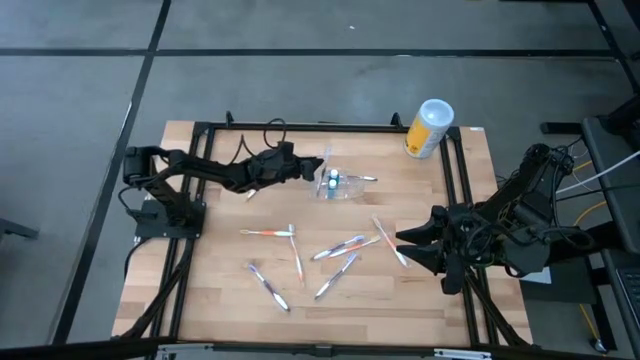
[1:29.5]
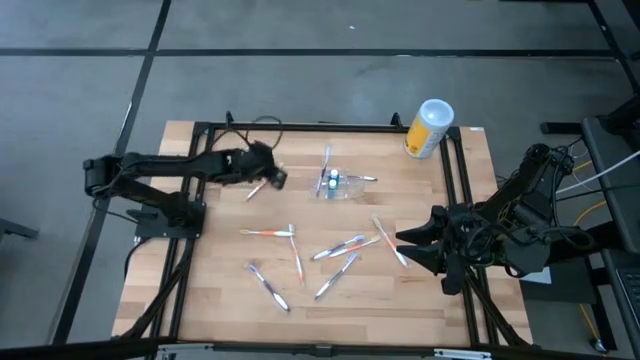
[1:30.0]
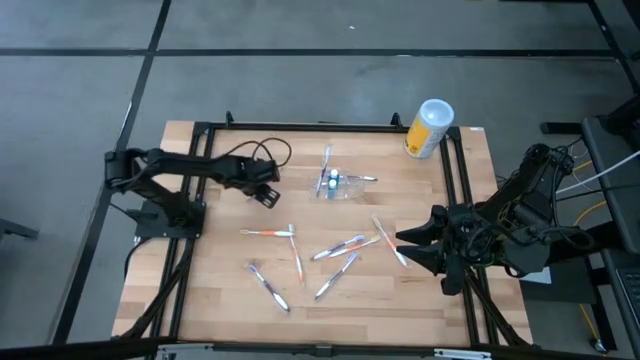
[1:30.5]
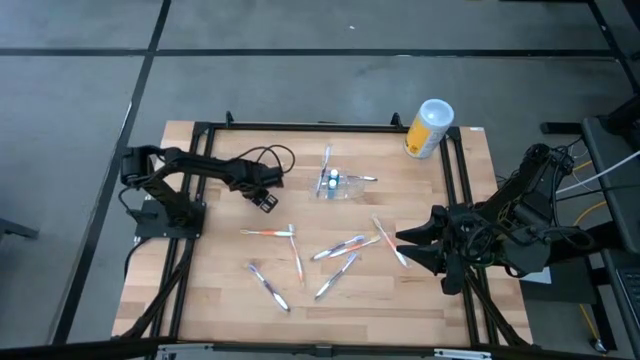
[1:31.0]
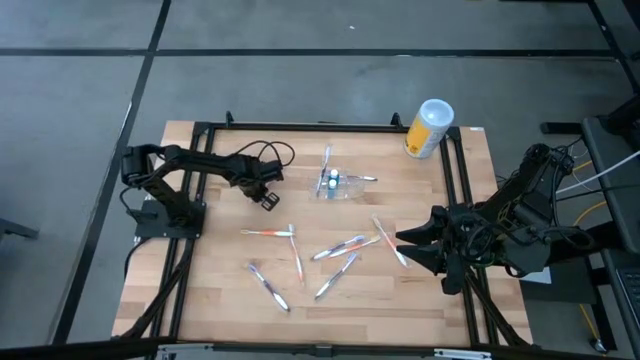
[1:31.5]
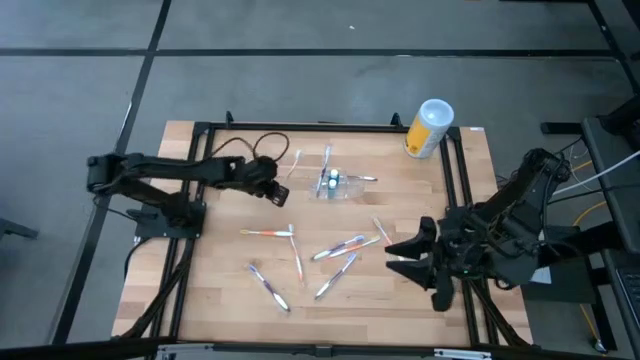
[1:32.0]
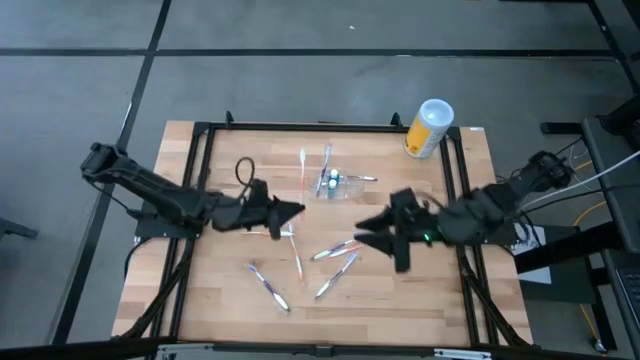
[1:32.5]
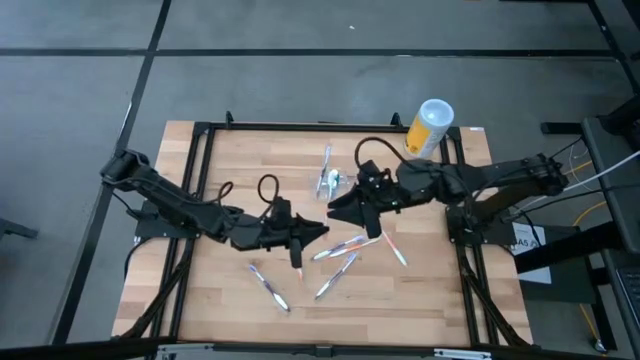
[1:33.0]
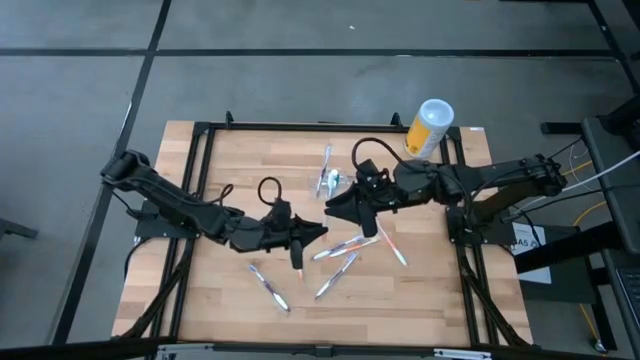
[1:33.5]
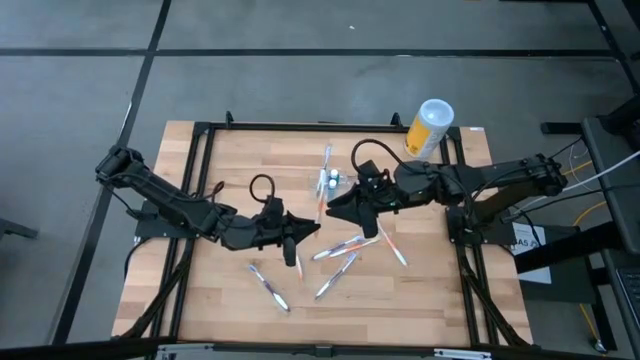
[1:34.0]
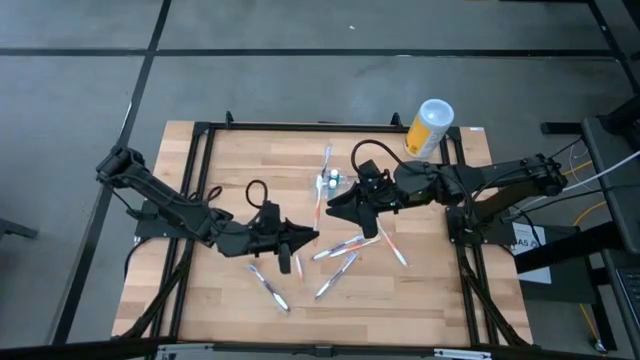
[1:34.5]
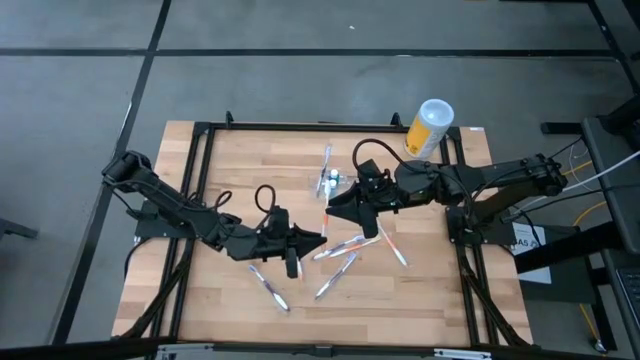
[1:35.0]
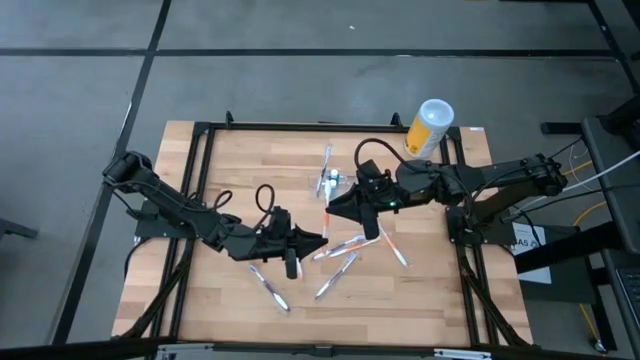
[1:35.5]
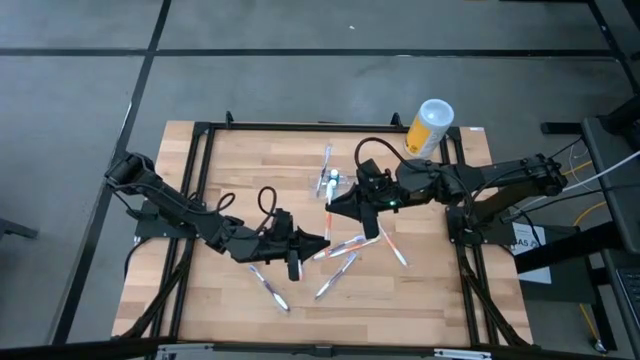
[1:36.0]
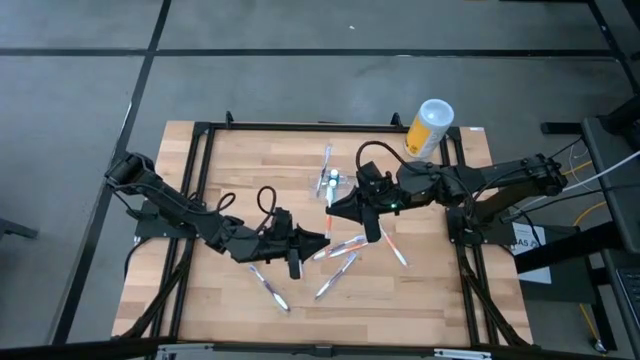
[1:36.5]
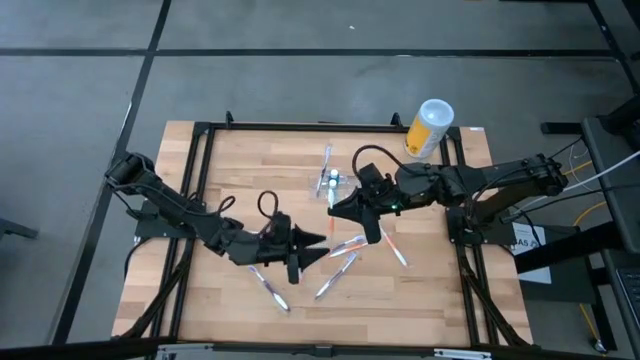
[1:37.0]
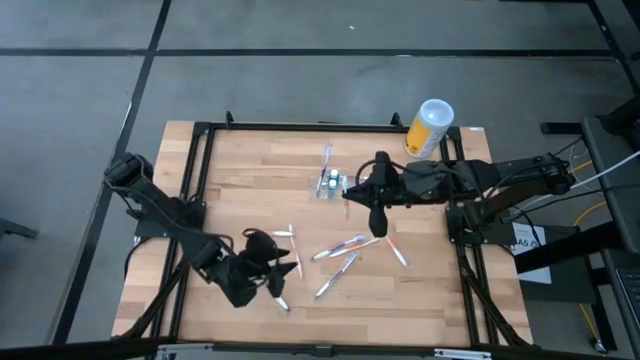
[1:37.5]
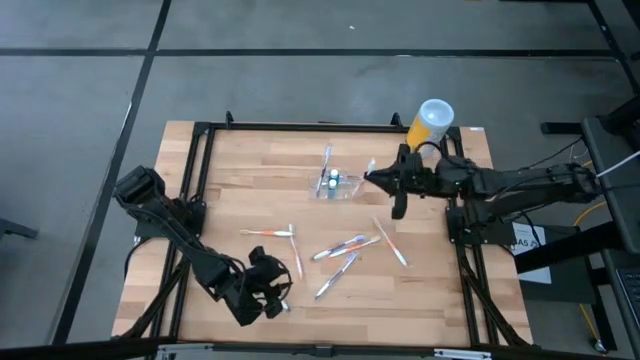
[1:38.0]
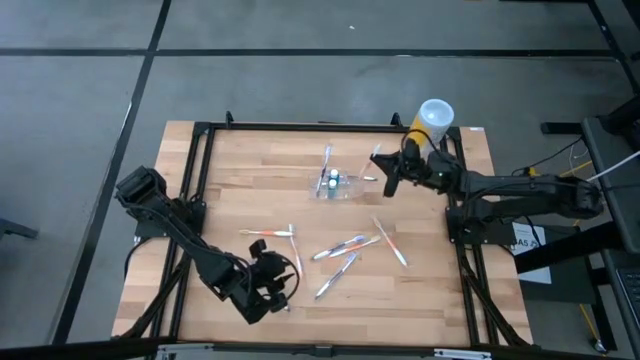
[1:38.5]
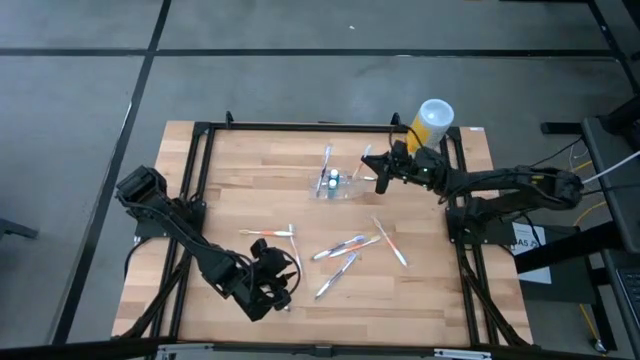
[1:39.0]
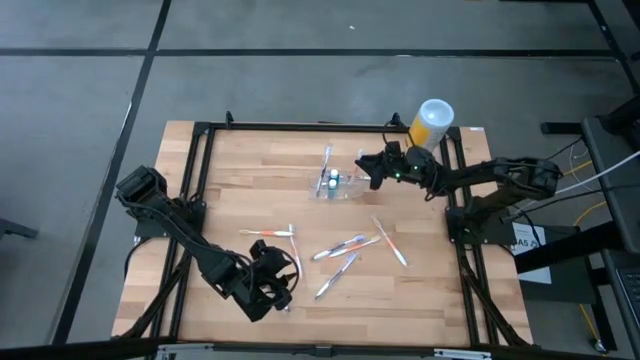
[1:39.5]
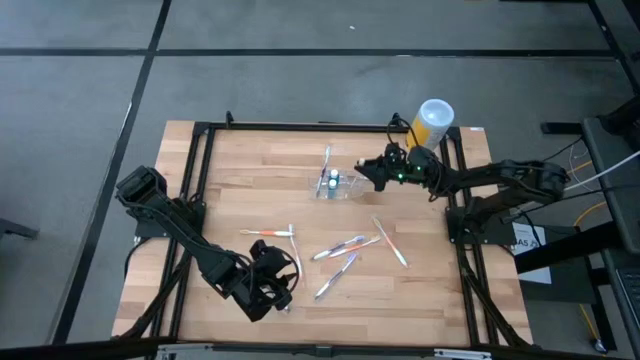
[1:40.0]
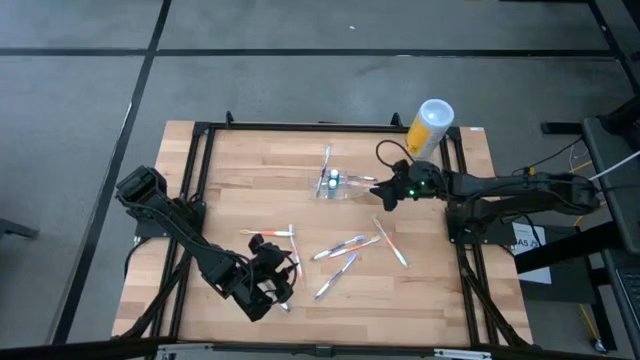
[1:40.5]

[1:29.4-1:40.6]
Task: Pick & Place toothbrushing station
Put the orange toothbrush into the right section of the transparent organizer

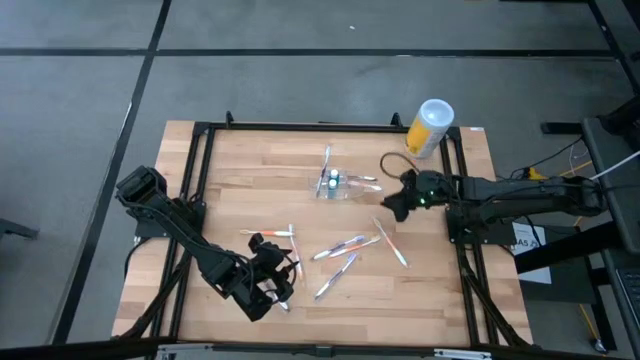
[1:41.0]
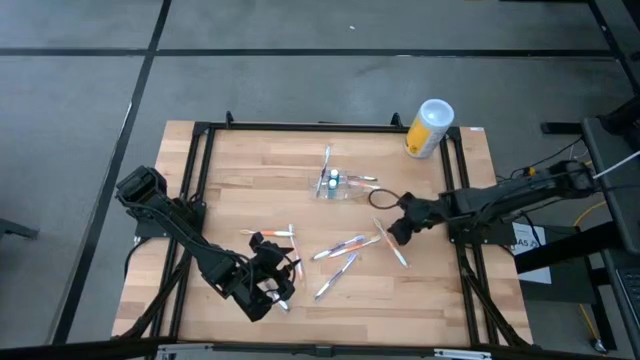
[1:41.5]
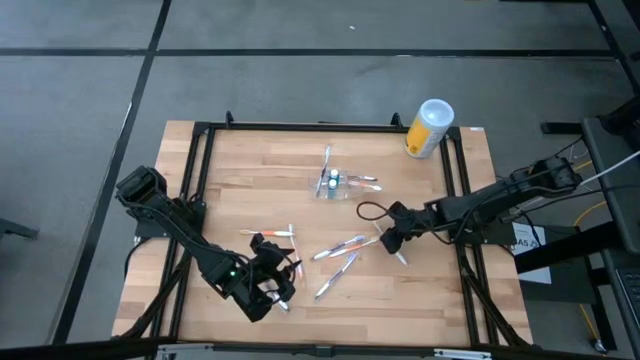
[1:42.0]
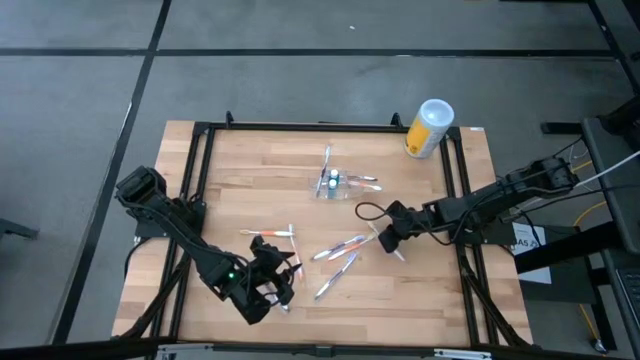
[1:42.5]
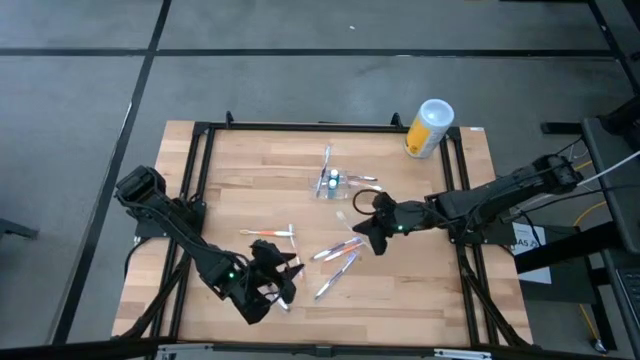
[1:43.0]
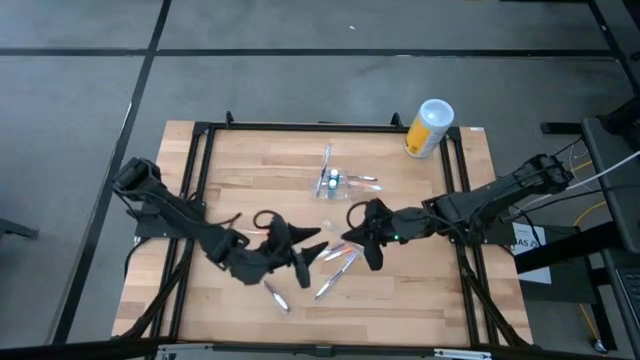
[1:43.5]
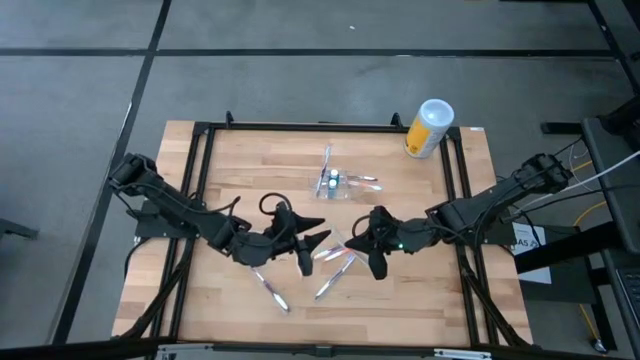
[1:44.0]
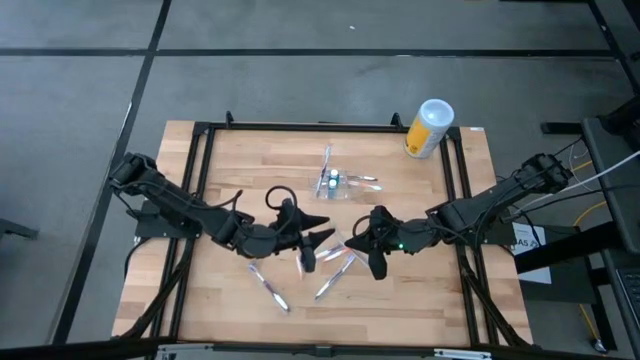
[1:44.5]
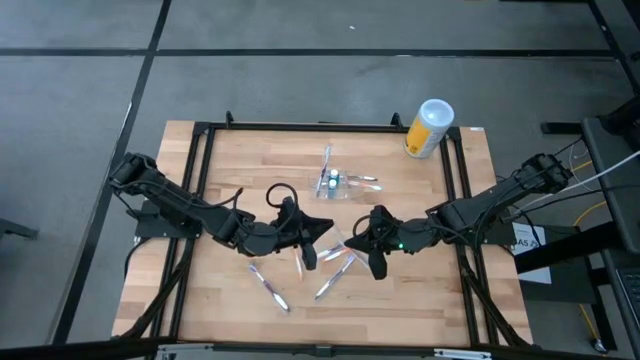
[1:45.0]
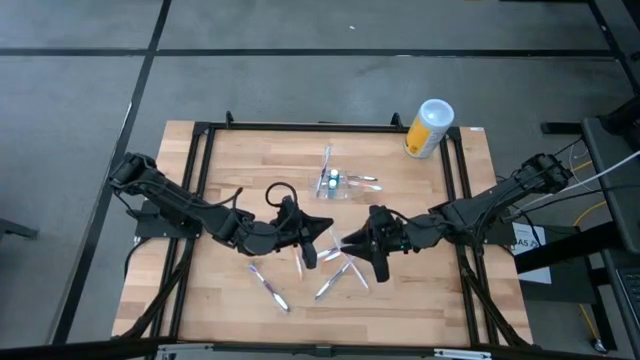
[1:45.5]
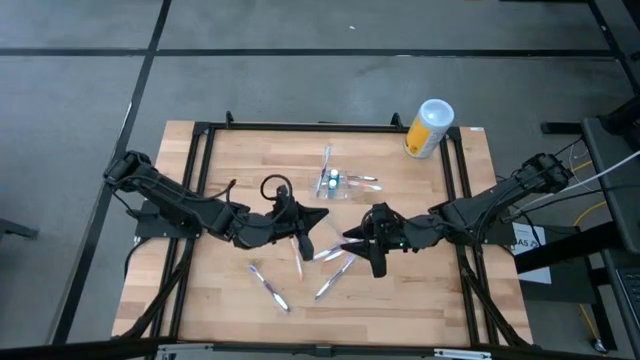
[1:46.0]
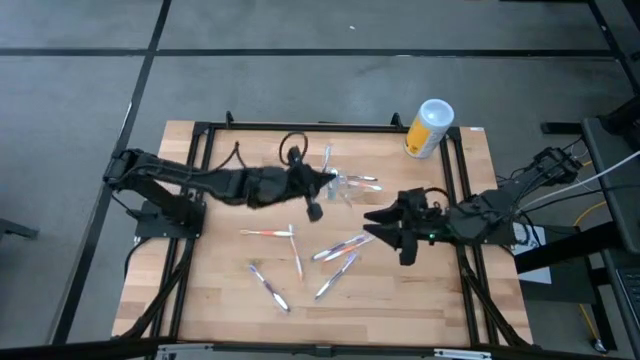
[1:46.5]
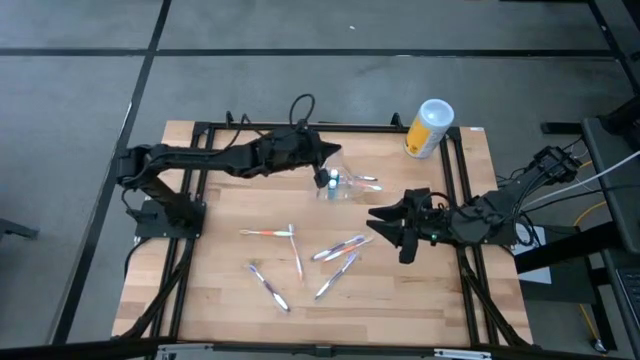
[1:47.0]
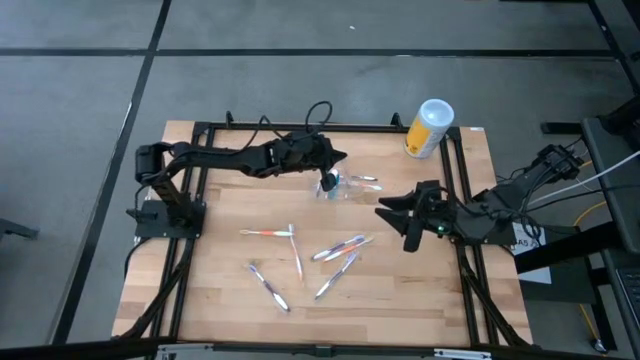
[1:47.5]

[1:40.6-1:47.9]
Put the orange toothbrush into the right section of the transparent organizer

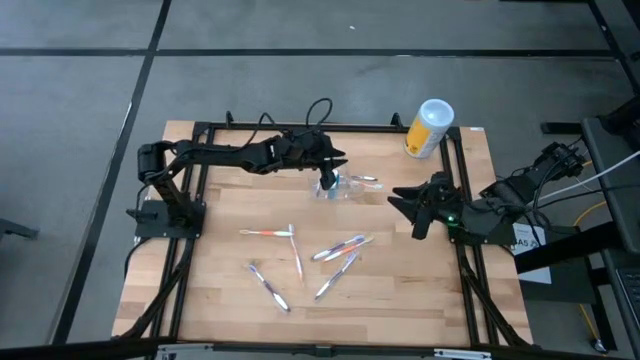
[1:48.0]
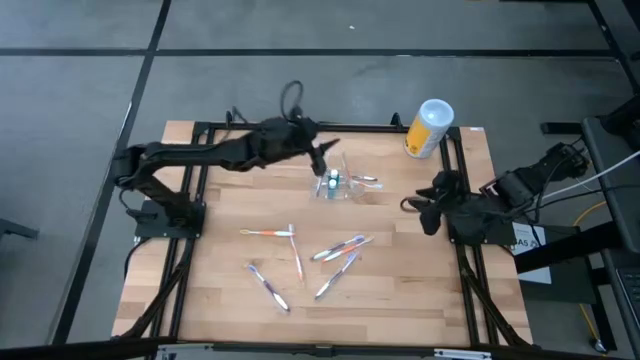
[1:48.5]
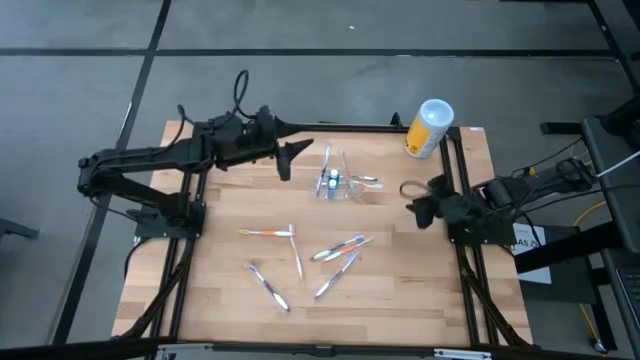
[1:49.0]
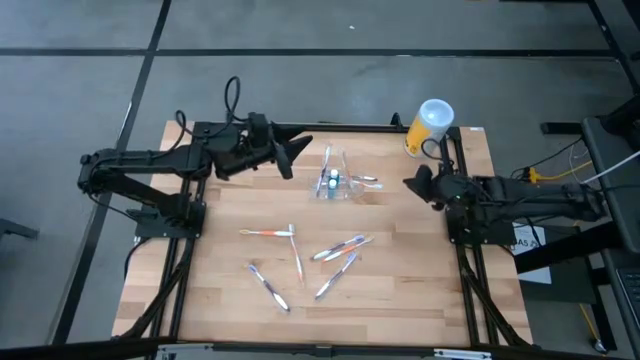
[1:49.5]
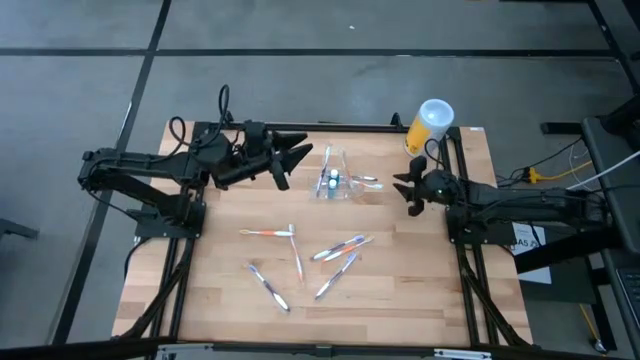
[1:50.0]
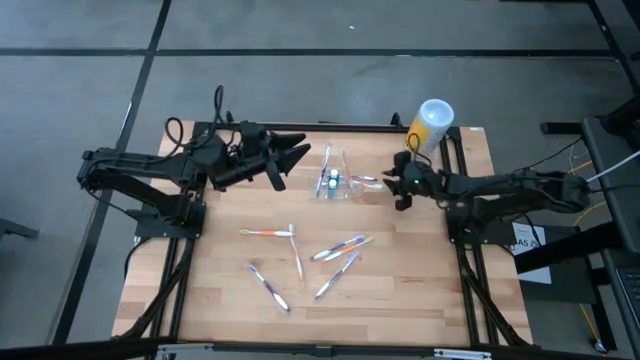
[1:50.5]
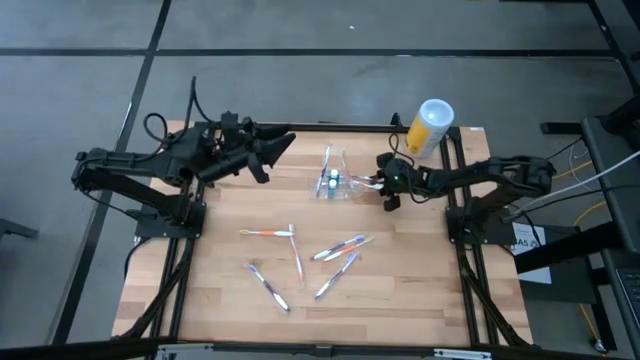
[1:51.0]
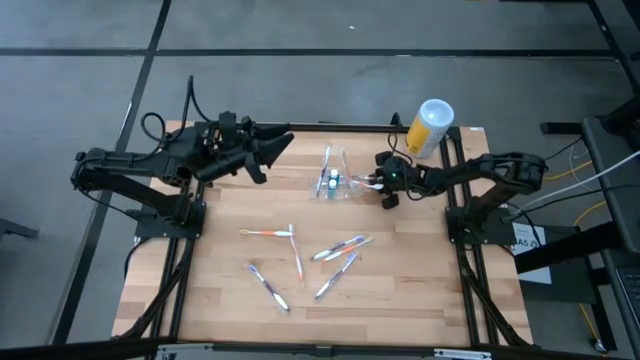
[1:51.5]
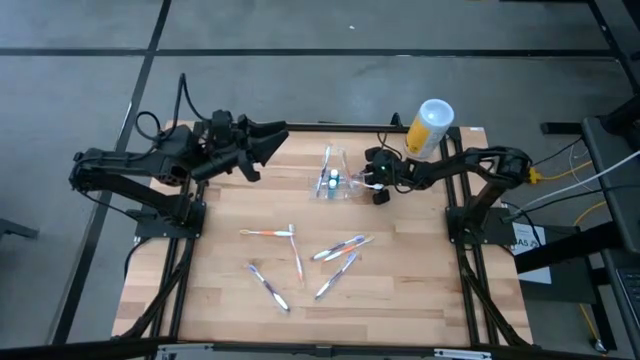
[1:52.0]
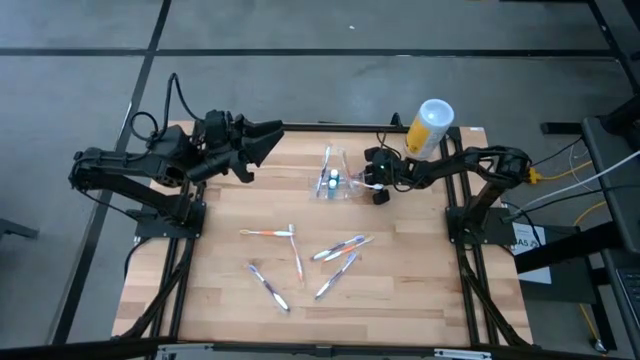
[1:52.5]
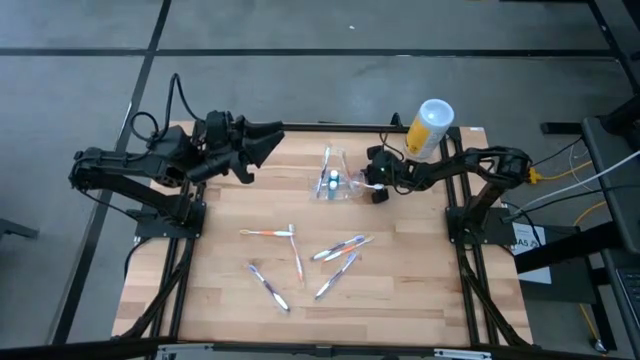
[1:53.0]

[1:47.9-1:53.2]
Put the purple toothbrush into the left section of the transparent organizer
